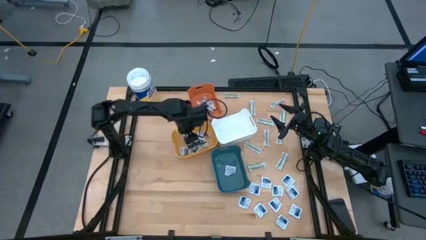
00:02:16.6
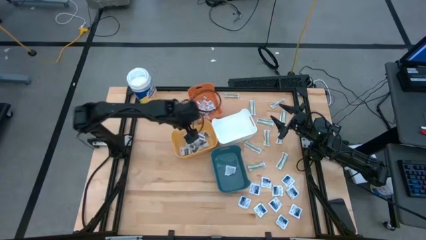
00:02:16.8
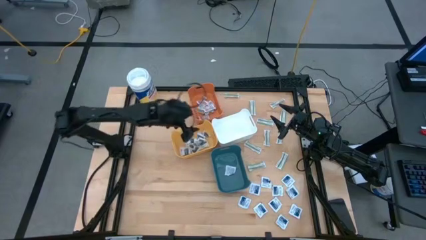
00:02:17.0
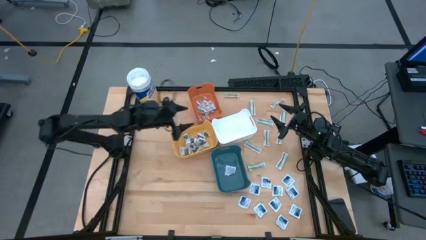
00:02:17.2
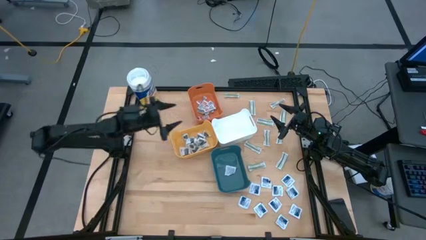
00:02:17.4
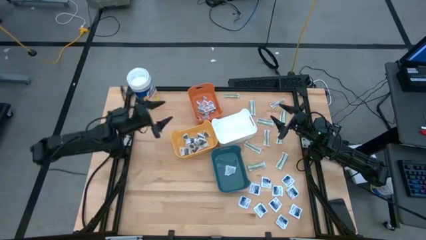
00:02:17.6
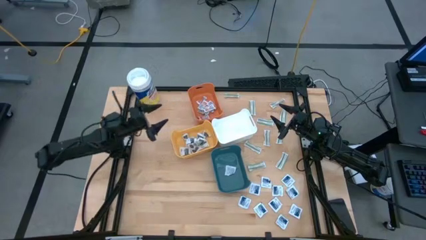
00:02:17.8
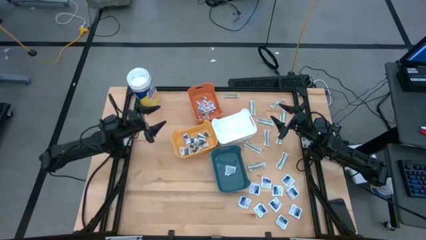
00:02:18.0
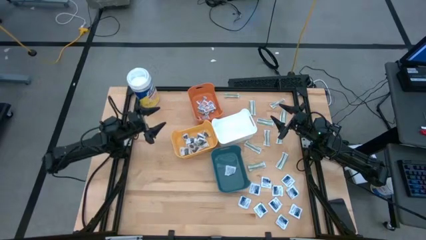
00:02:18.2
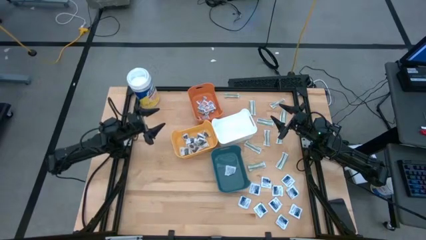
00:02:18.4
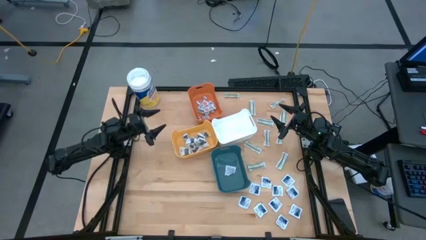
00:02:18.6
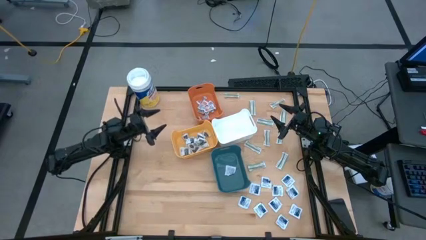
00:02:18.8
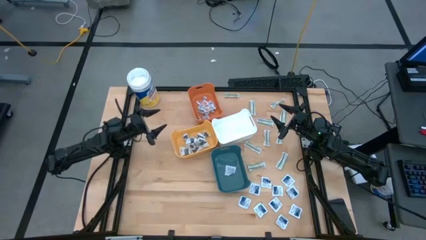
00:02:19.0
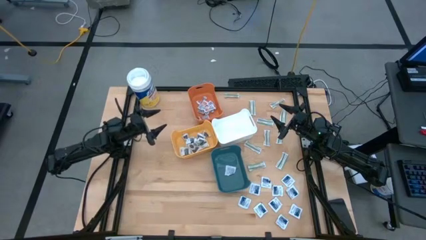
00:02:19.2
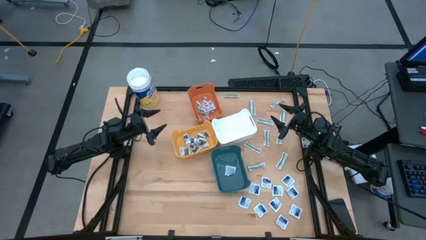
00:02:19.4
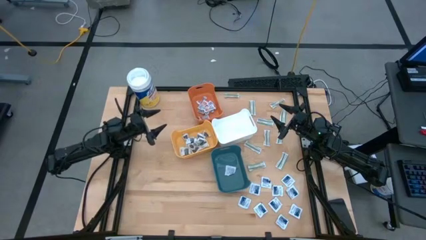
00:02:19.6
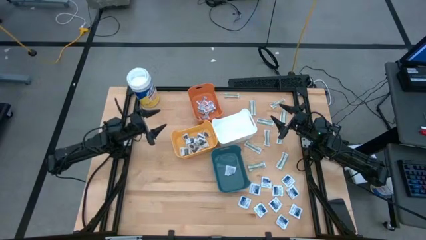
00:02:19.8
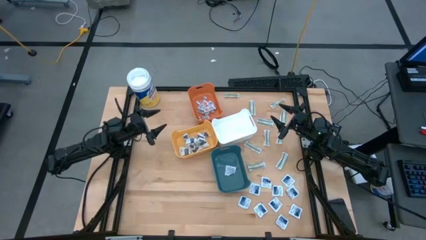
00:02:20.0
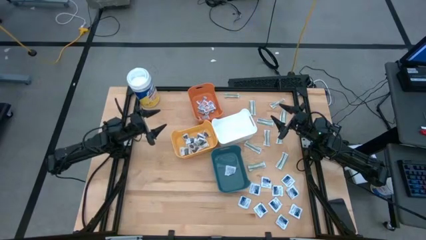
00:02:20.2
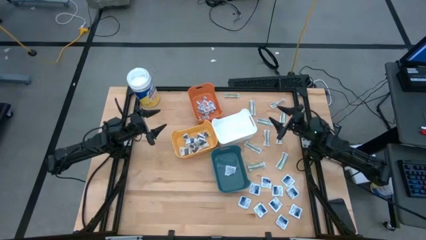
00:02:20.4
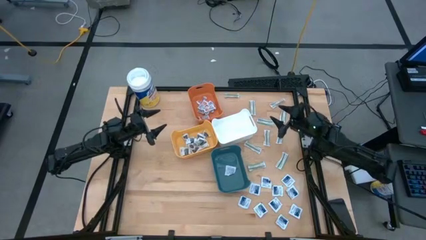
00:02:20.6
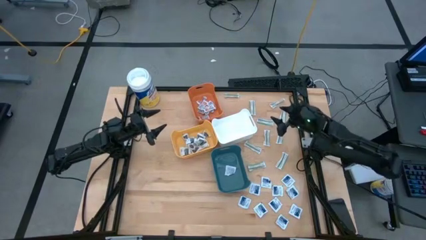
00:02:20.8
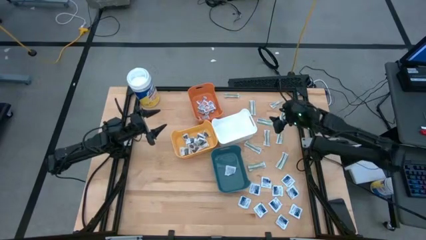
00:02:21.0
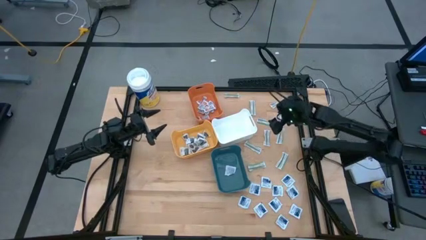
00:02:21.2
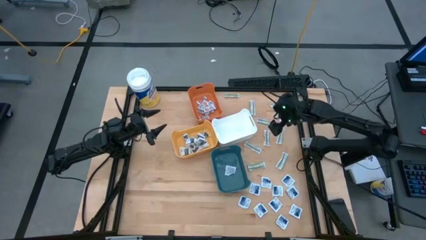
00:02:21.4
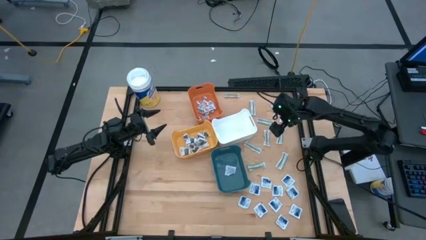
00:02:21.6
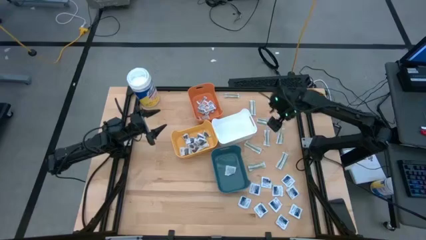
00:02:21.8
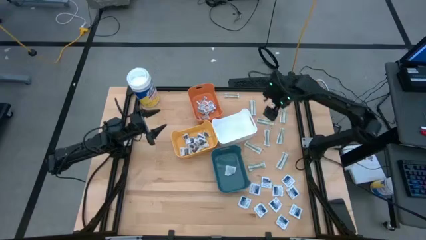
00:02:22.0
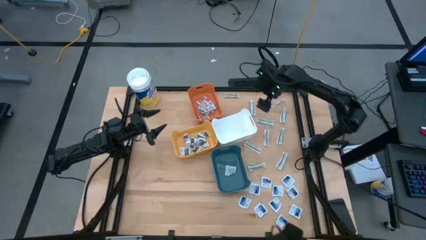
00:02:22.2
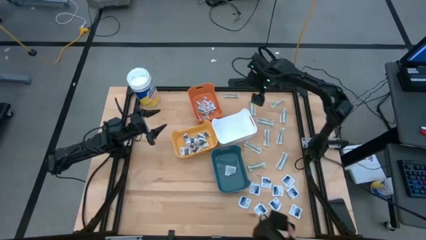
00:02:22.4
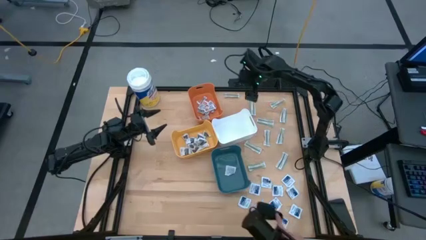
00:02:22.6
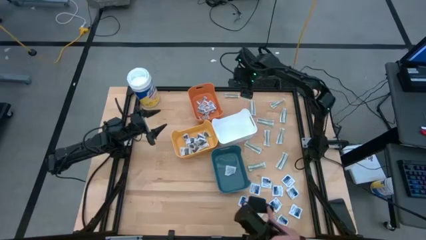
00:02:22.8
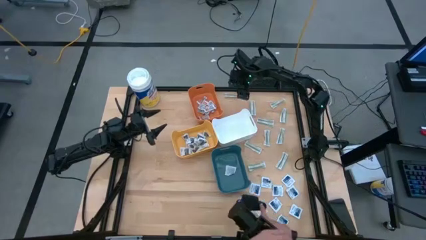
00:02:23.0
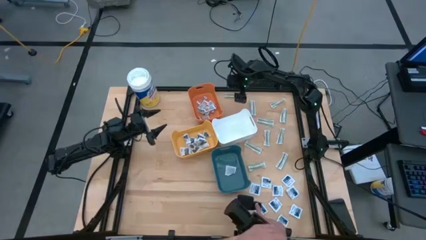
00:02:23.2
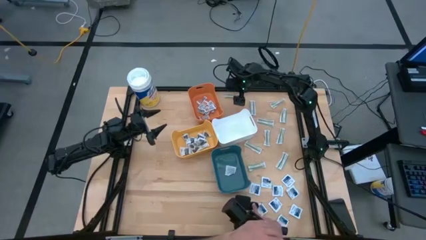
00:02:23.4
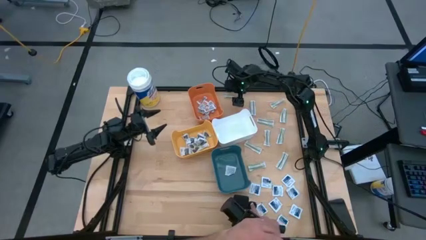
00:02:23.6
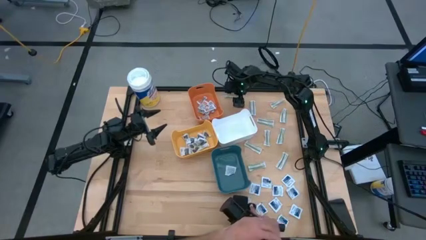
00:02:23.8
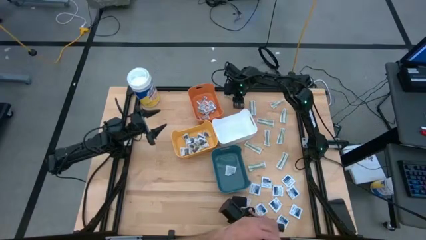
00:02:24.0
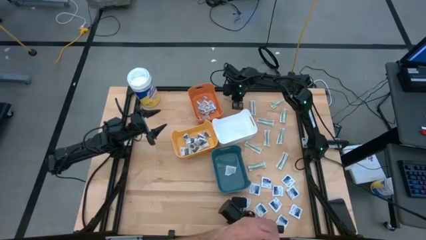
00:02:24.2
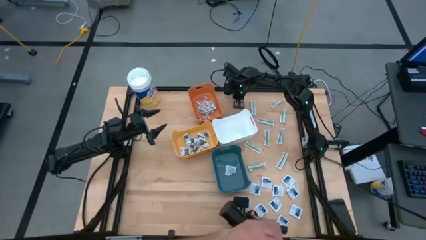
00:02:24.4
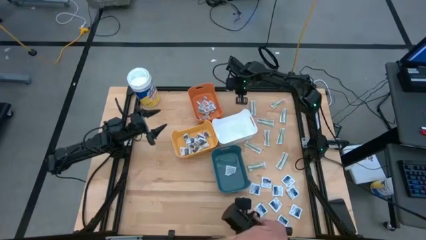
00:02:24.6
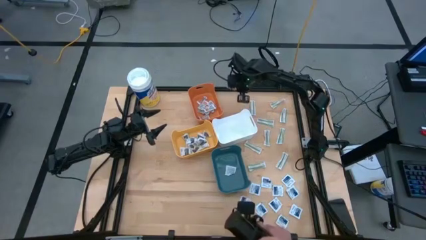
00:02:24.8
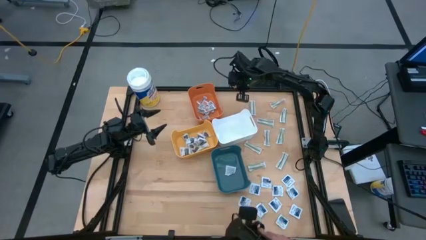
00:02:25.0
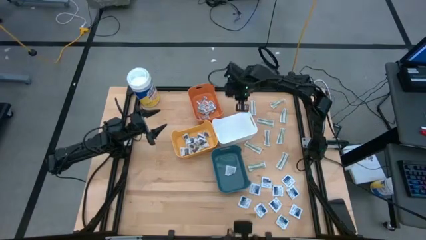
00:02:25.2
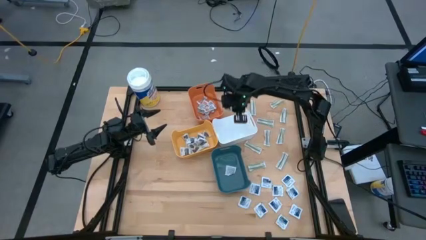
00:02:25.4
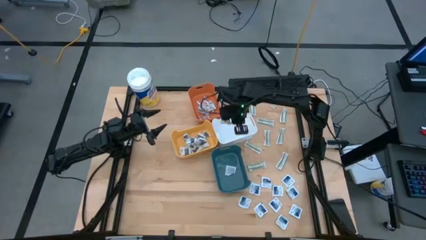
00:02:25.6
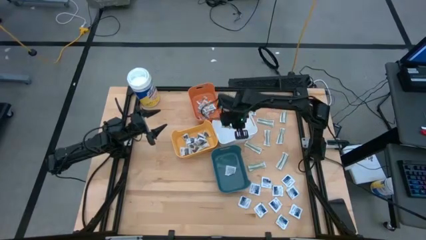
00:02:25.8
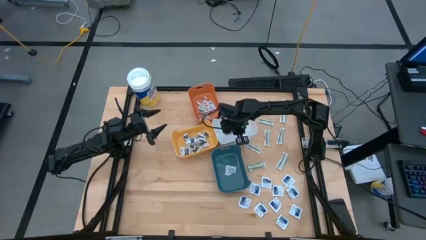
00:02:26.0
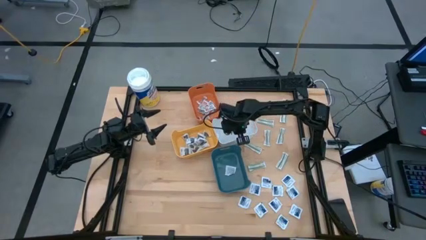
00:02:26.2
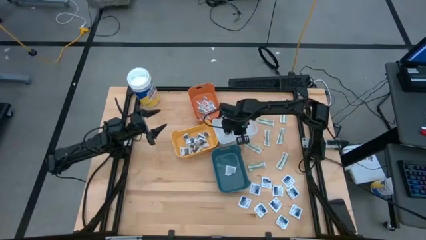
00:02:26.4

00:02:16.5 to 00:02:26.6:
Task: Pick & Place First Aid Supplies
Put the green bandage into the white bin

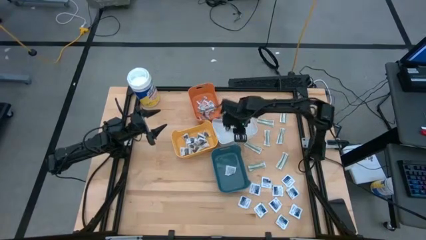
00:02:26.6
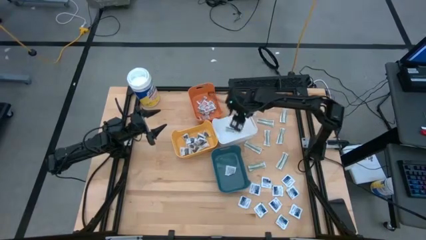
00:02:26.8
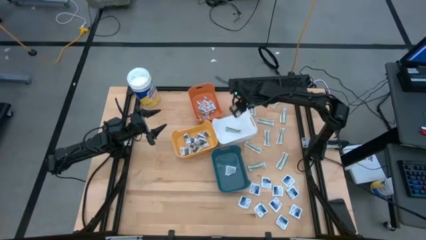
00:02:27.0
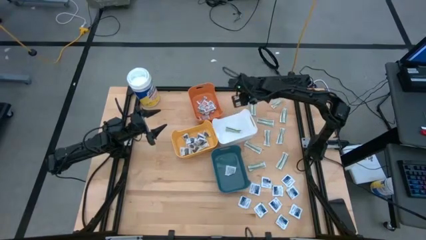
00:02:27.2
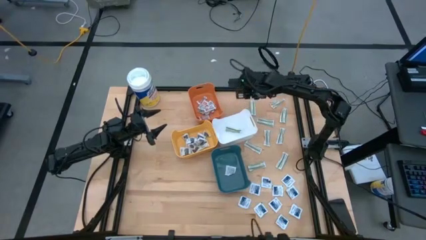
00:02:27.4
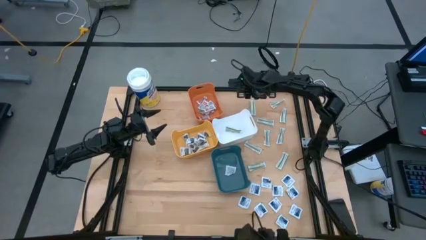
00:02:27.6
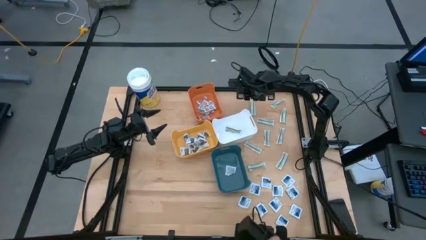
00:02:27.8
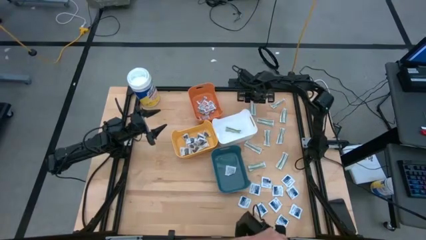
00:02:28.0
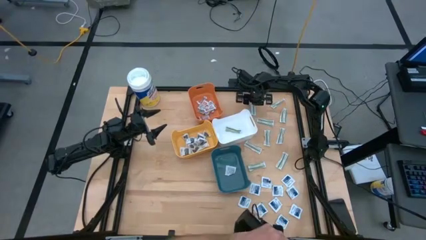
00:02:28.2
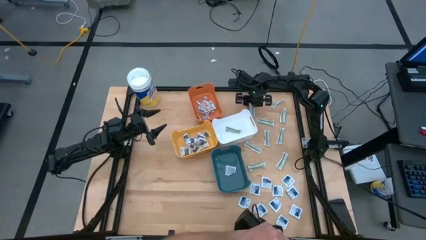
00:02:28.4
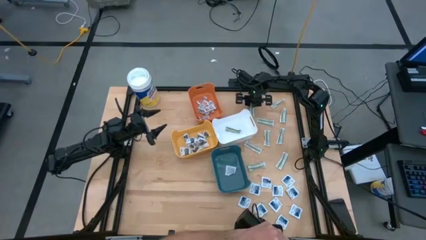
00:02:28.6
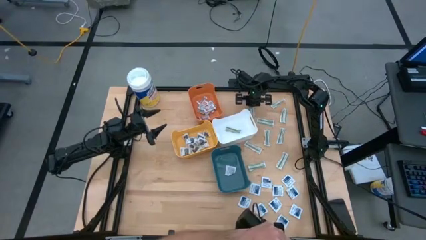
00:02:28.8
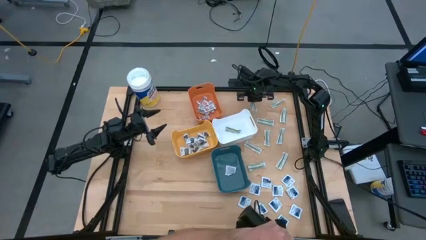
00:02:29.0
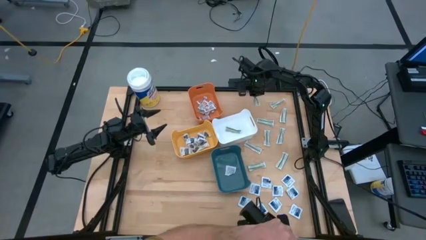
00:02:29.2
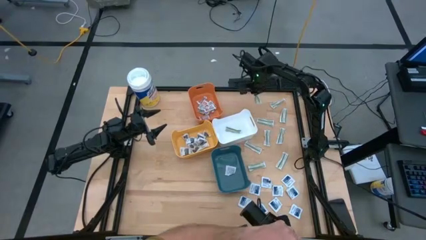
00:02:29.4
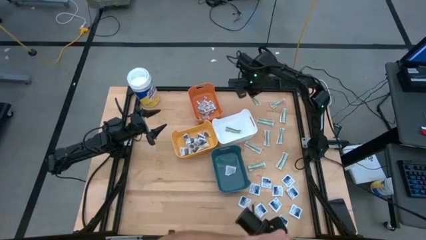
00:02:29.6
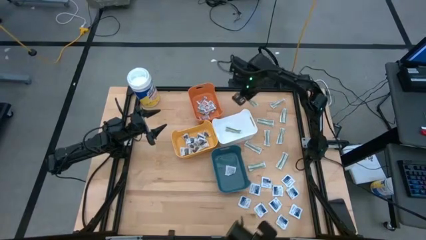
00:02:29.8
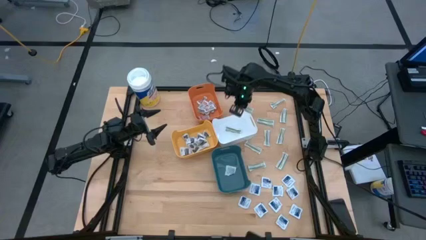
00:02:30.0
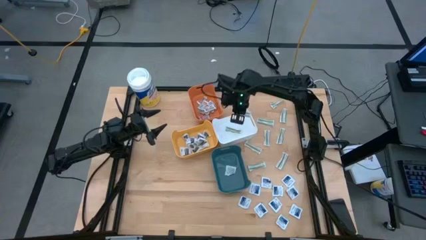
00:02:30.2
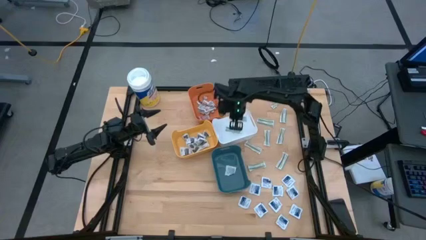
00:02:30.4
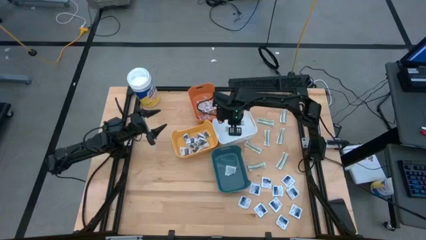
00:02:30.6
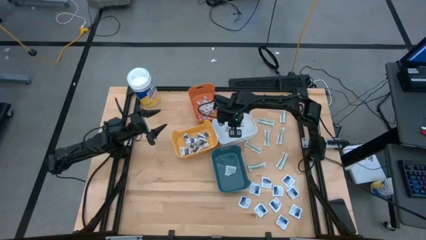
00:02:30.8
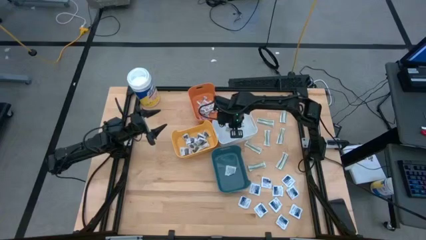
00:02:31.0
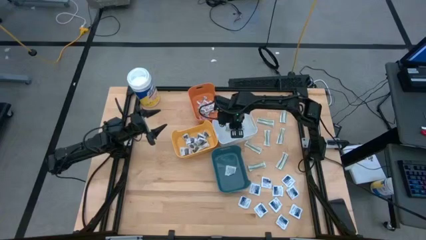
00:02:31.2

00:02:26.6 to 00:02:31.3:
Put the green bandage into the white bin
